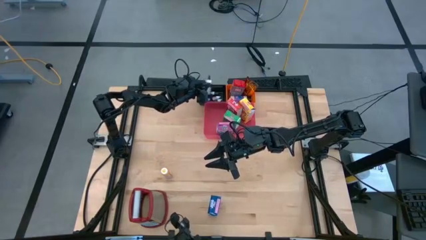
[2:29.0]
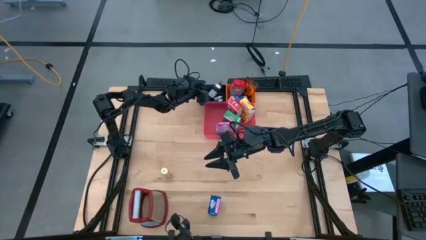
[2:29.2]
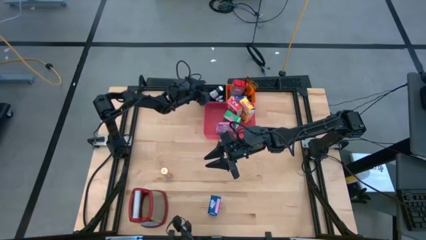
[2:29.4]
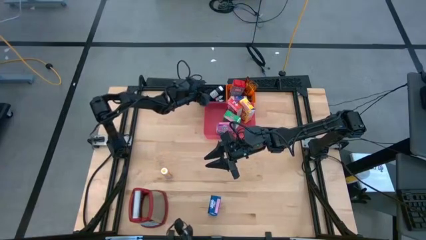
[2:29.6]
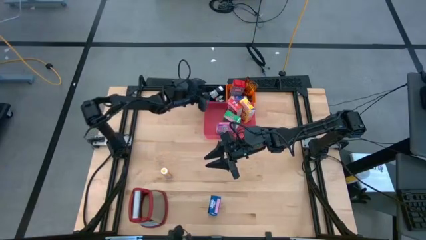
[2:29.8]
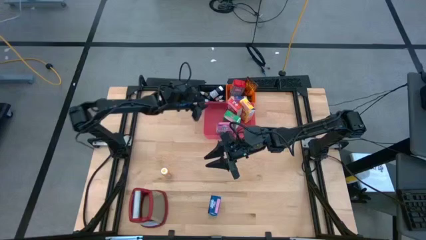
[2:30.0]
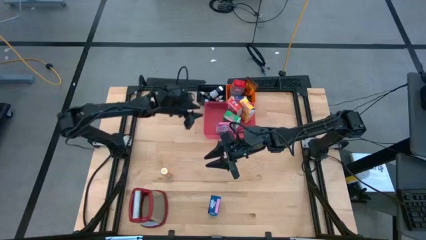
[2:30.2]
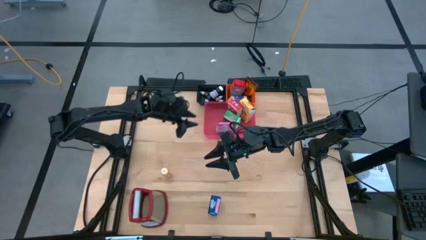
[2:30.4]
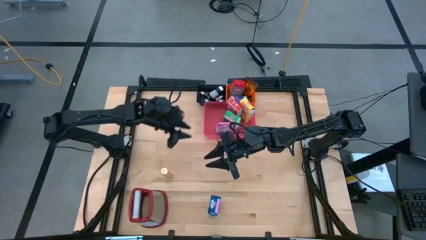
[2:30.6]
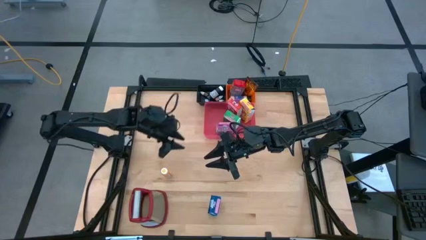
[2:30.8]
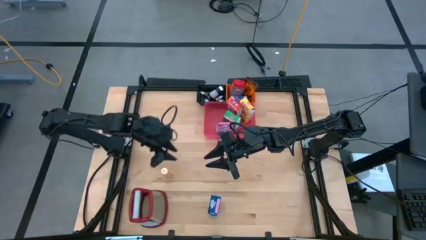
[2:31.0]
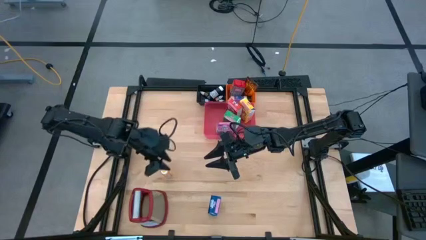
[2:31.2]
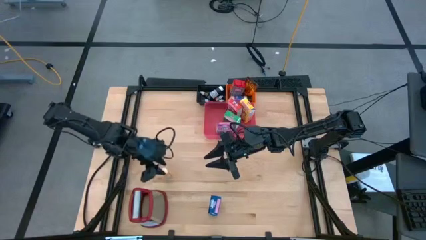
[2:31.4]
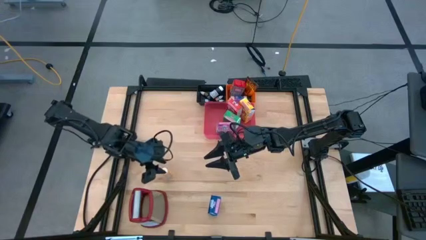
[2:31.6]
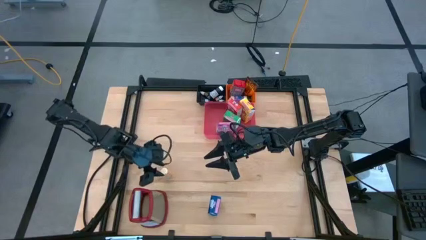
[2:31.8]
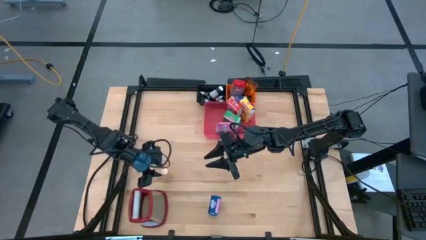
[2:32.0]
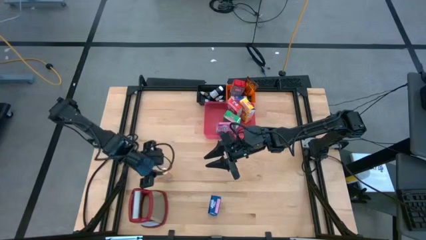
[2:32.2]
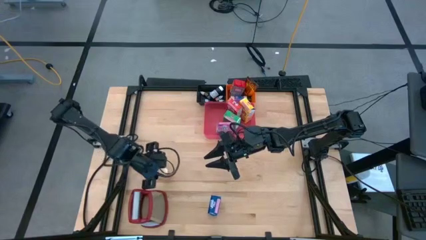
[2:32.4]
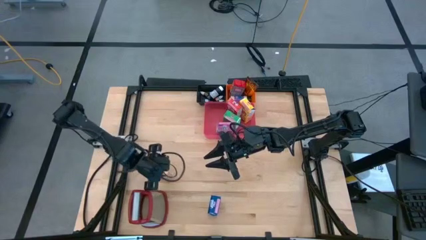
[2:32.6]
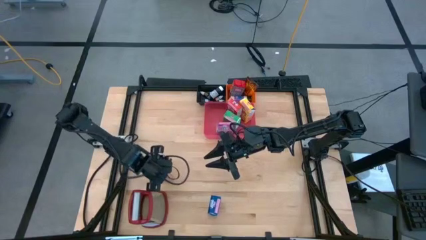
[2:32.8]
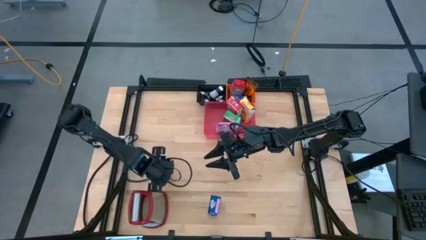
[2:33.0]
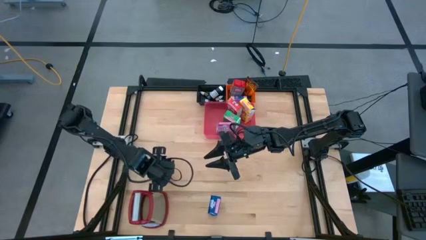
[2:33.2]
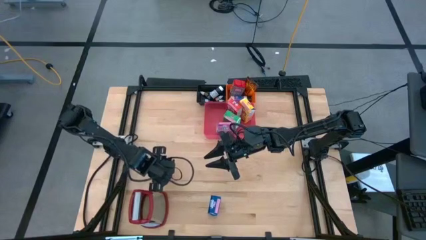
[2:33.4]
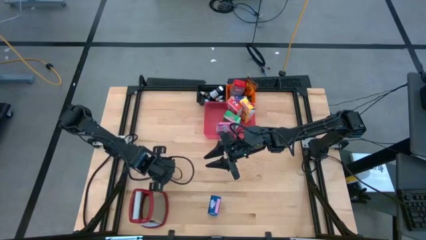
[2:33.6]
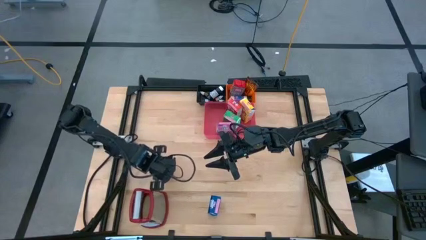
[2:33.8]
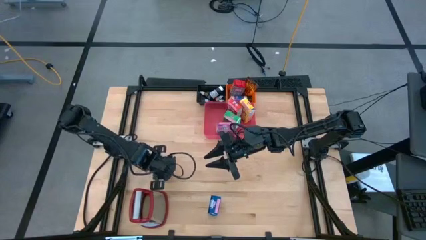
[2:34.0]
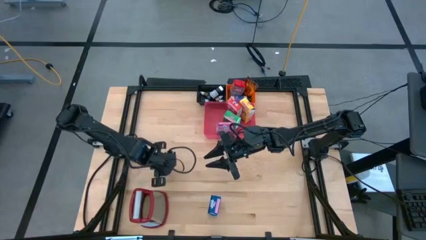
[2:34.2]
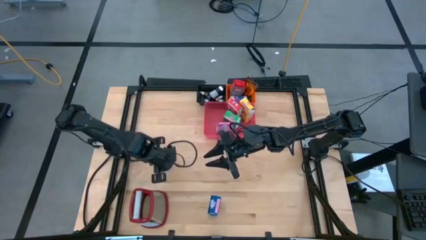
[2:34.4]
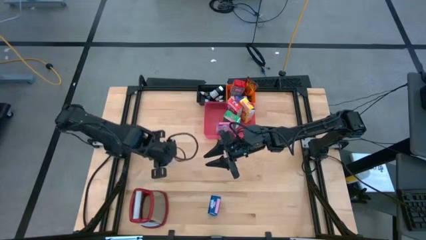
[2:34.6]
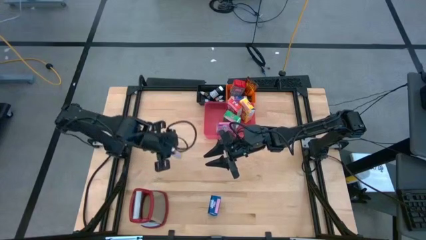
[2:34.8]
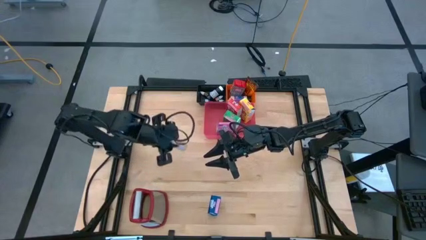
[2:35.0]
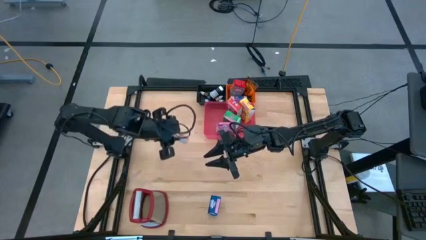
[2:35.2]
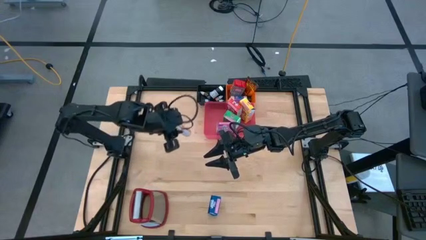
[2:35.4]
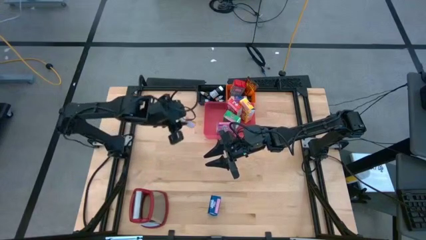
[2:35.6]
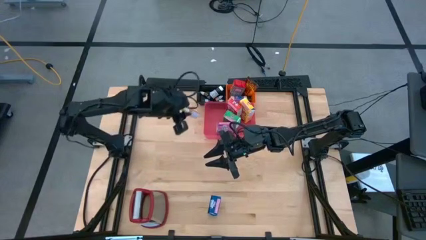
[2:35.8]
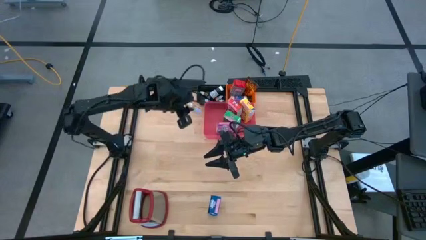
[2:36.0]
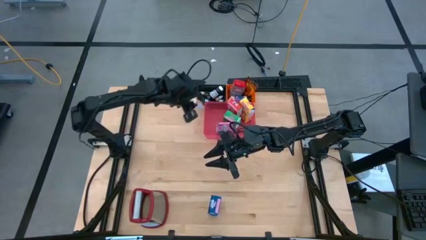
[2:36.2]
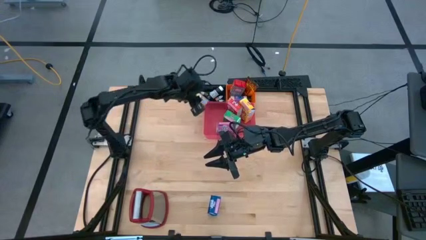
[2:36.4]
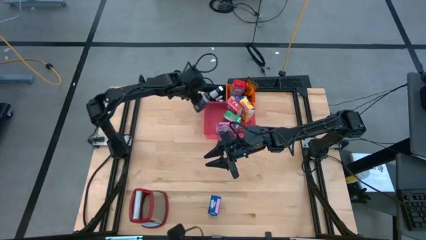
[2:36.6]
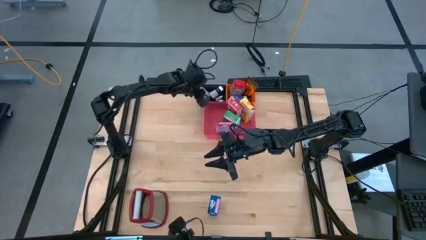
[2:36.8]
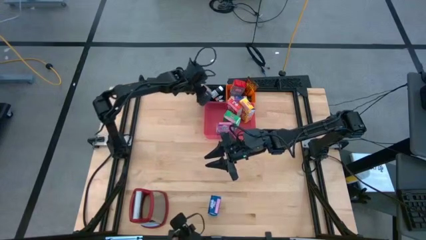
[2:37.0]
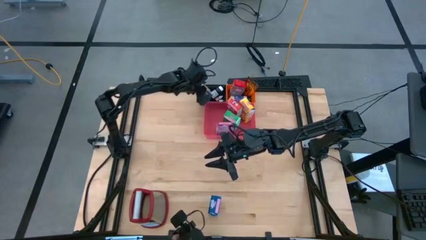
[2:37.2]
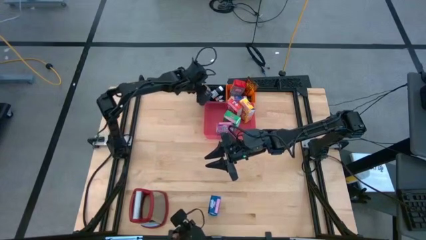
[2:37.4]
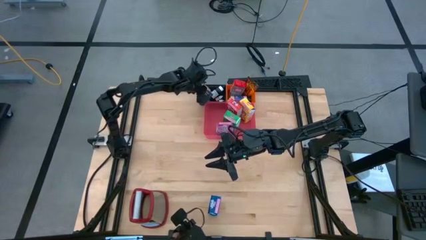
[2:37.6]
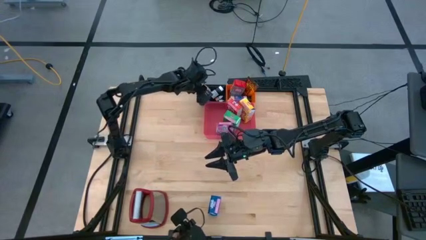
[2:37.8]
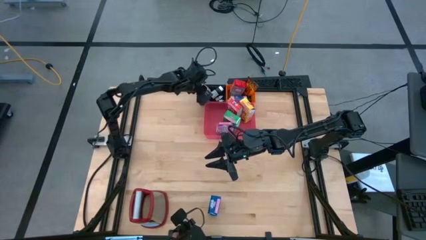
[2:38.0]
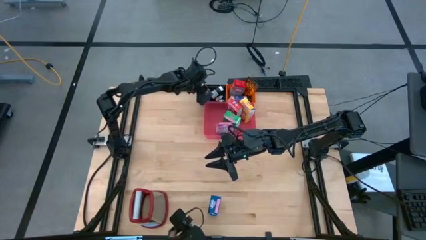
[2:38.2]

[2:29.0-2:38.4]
Task: Pick & Place Kitchen Items
Put the large yellow food coloring bottle into the black bin

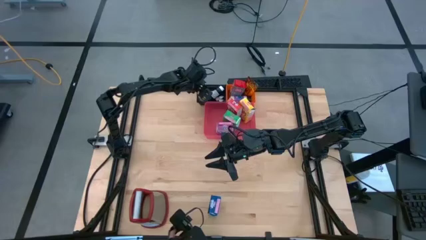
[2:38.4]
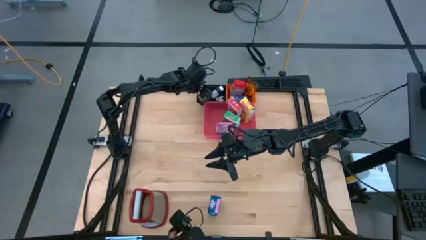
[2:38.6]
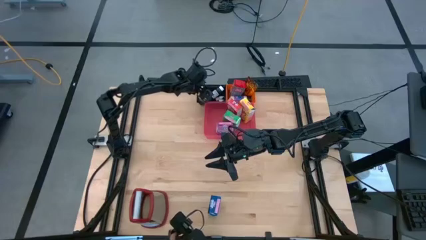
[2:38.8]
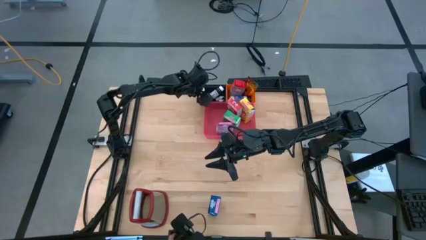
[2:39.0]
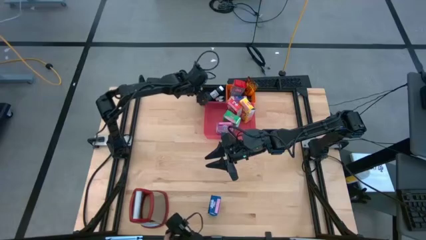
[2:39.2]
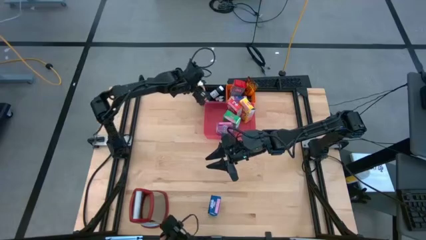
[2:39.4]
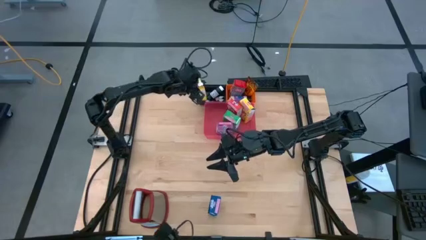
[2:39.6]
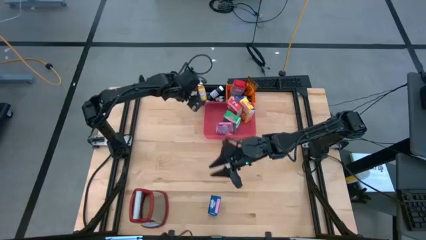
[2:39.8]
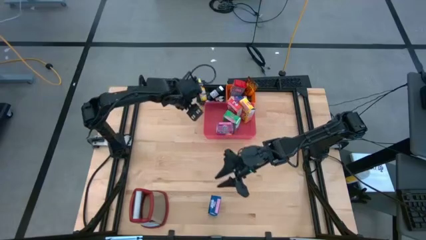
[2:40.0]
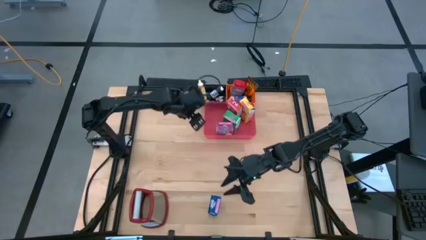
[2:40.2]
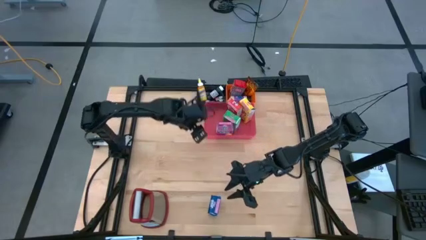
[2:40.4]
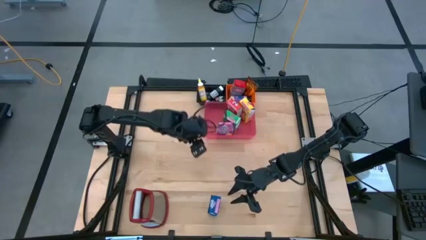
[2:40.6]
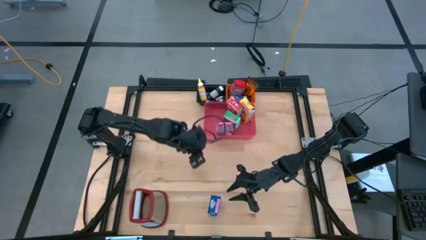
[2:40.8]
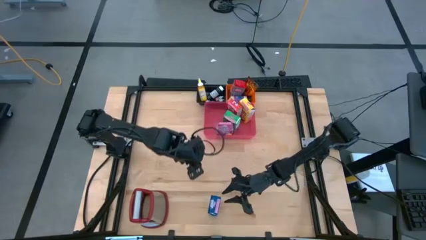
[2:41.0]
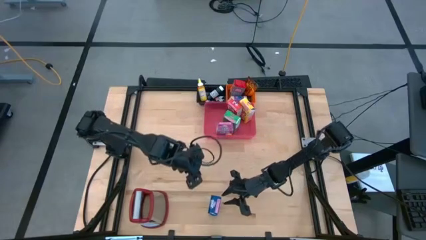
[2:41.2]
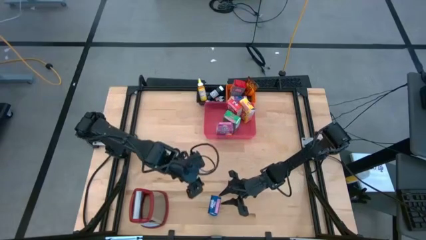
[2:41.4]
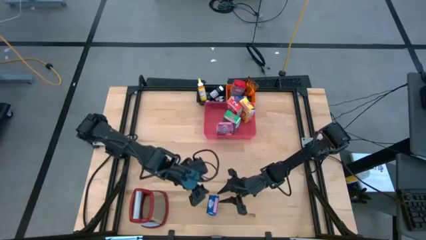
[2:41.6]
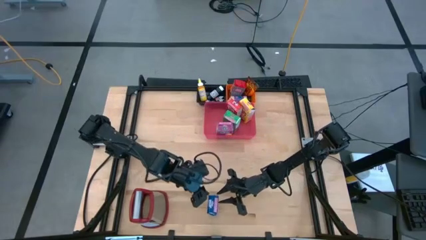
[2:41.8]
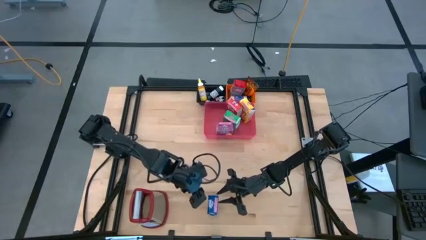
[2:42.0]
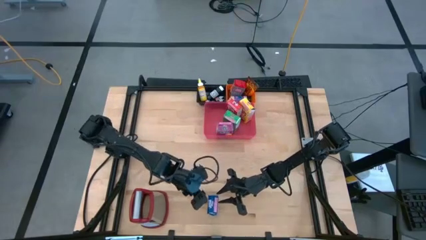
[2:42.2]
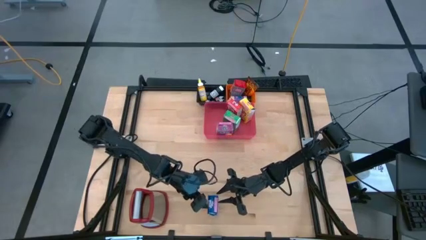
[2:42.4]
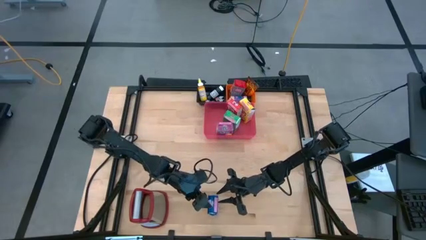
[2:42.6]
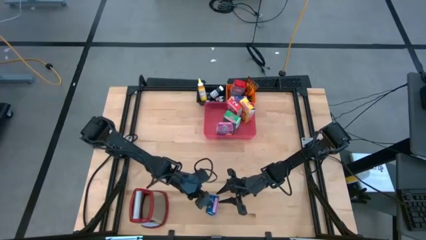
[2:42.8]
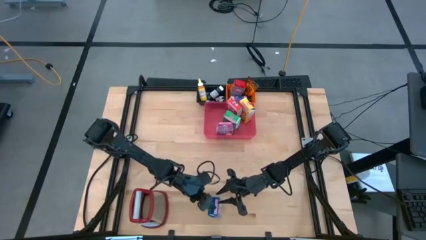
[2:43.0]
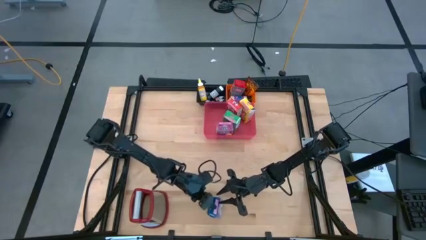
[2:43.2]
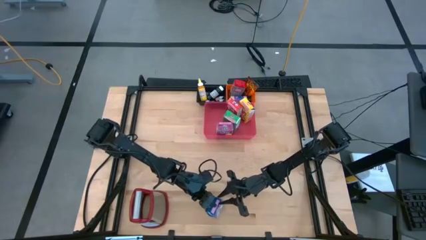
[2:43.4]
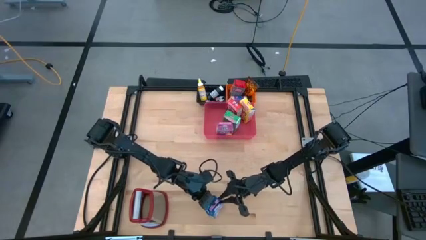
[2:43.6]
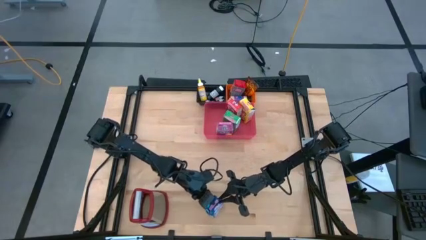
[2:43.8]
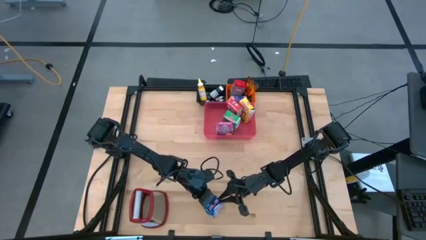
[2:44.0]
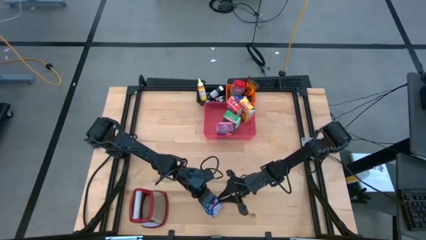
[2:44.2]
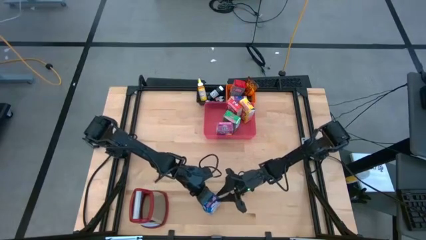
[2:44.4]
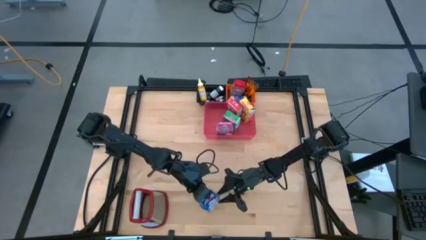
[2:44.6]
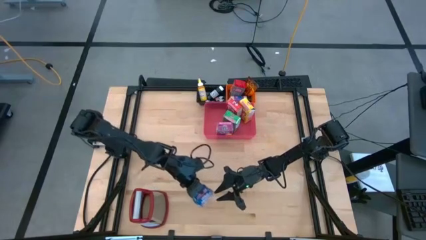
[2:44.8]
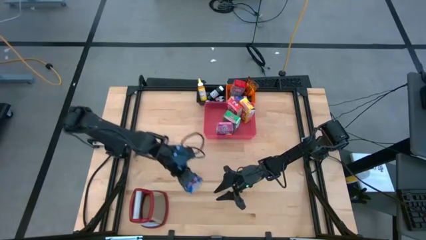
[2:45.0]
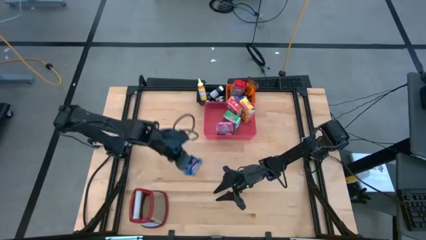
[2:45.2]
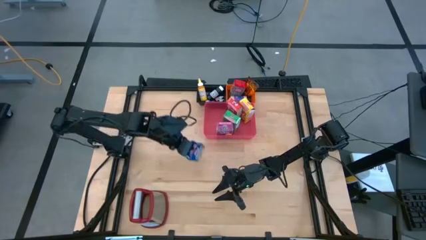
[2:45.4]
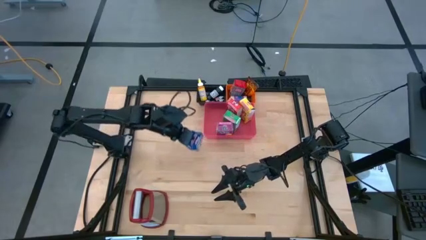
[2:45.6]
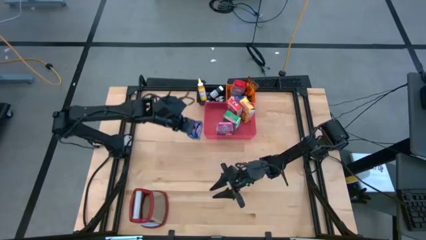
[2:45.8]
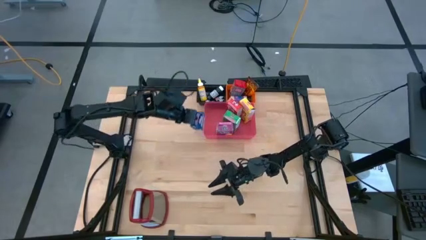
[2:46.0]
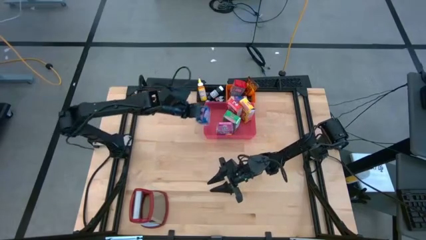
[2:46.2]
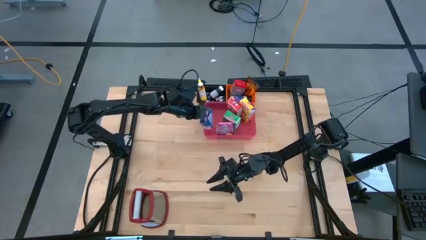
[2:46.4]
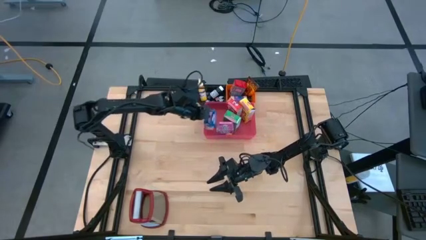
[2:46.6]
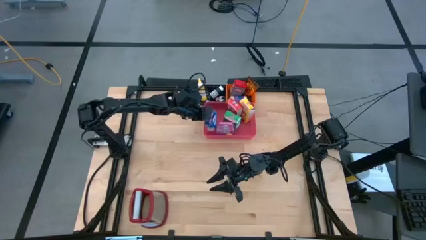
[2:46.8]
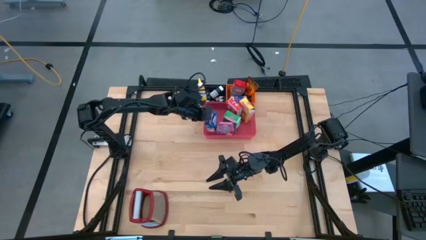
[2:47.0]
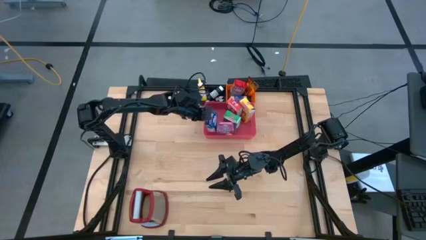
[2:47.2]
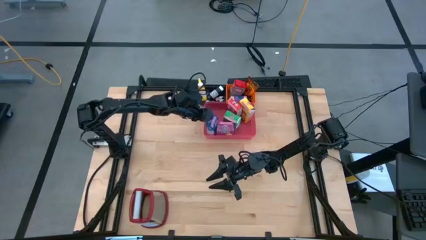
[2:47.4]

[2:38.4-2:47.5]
Put the blue cereal box into the pink bin
